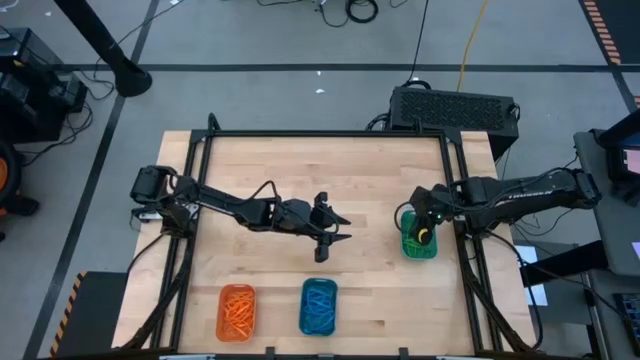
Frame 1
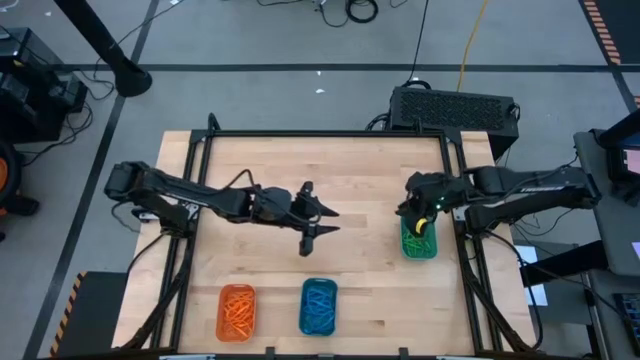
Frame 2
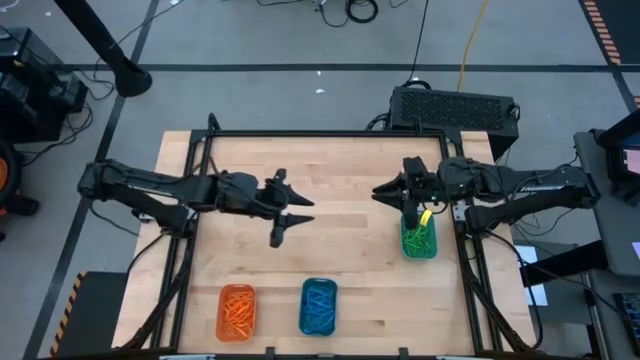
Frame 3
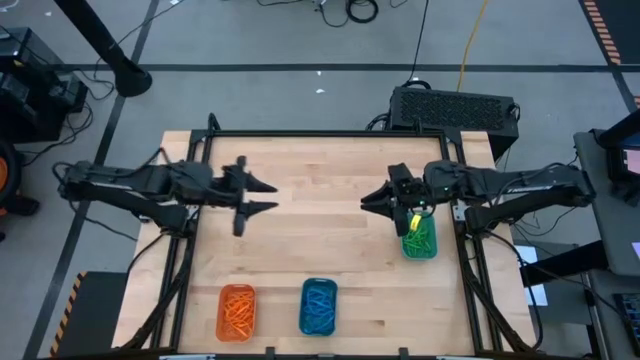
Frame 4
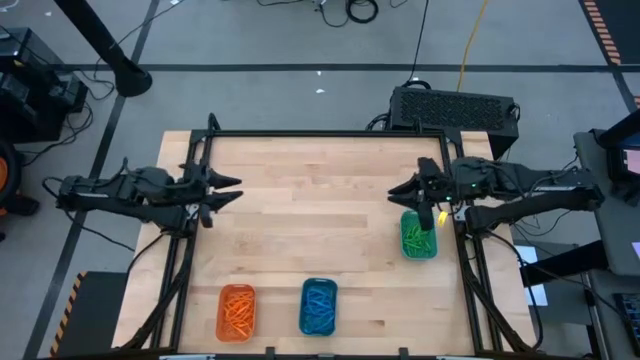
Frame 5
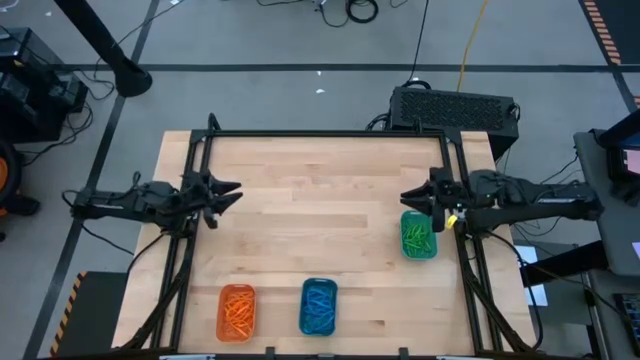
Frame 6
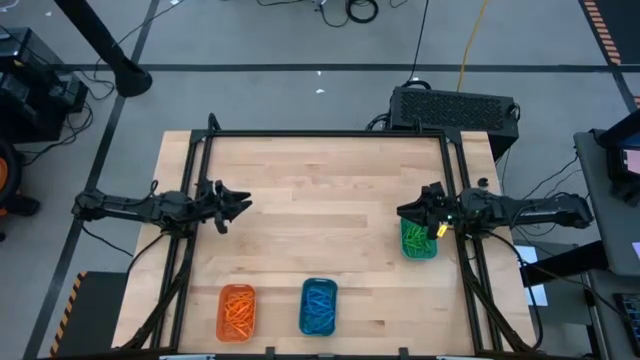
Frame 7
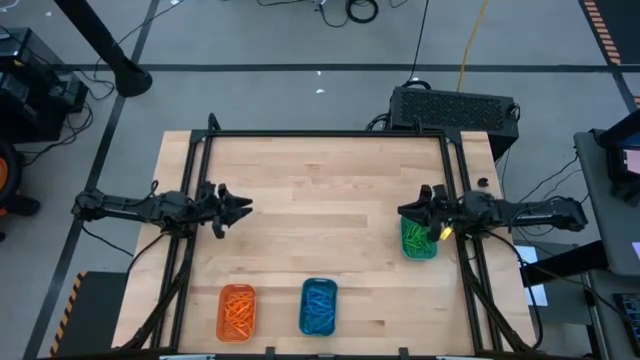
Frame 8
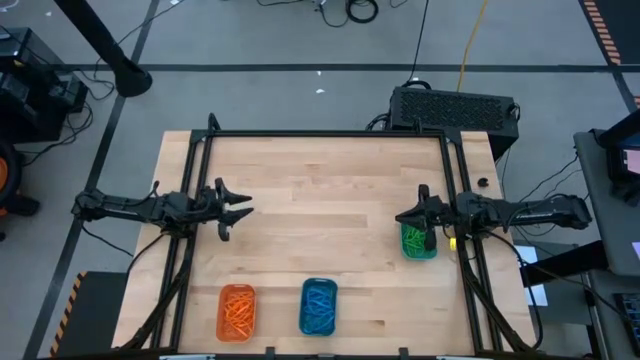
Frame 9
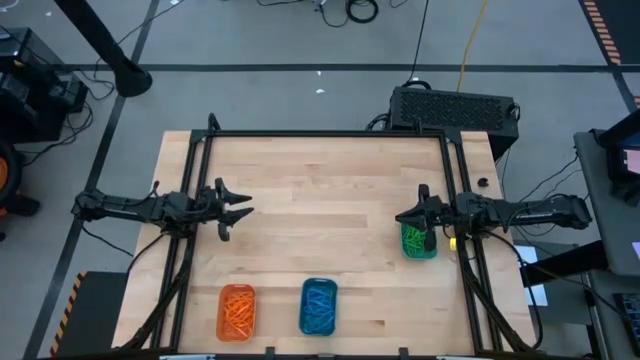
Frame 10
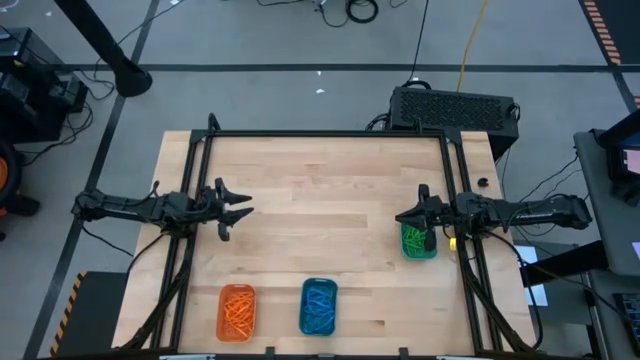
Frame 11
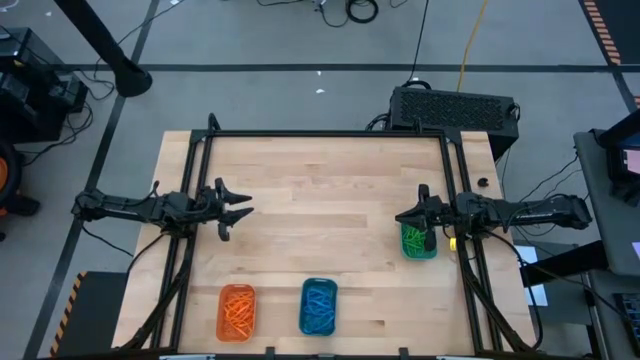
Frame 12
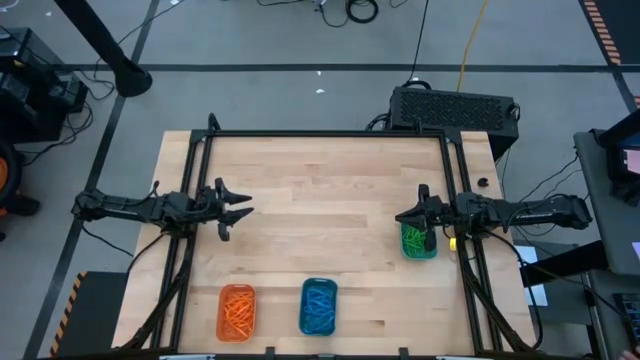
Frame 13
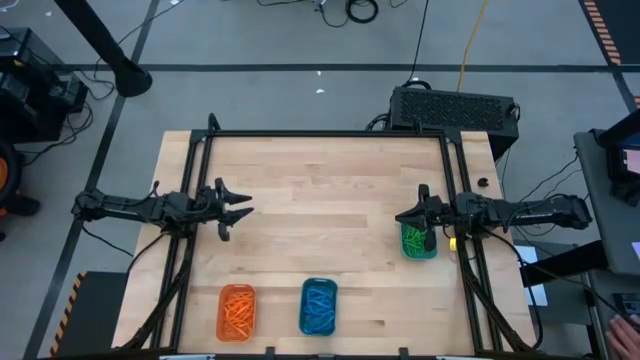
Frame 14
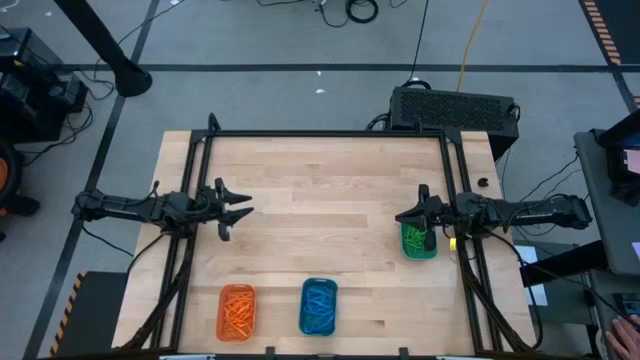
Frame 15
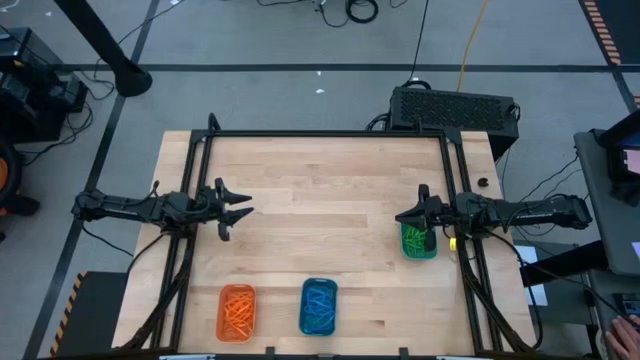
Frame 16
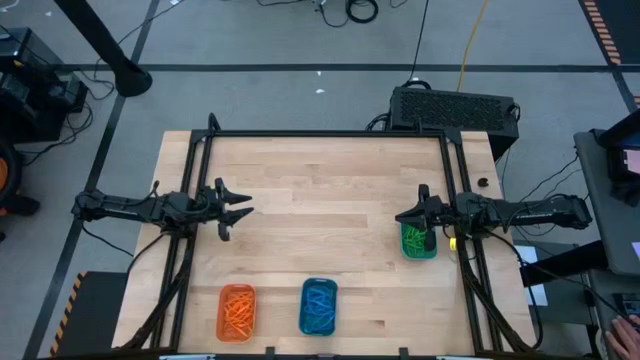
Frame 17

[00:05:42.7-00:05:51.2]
Task: Sort rubber bands into baskets
Return to Home Position

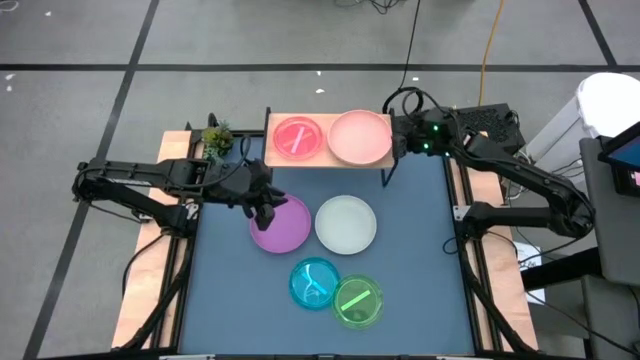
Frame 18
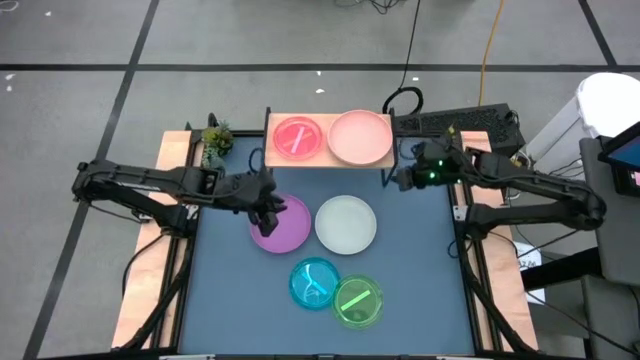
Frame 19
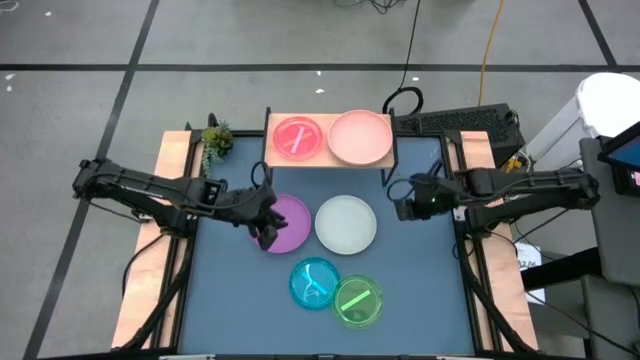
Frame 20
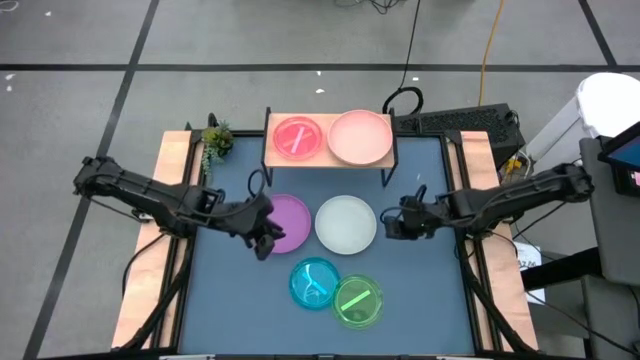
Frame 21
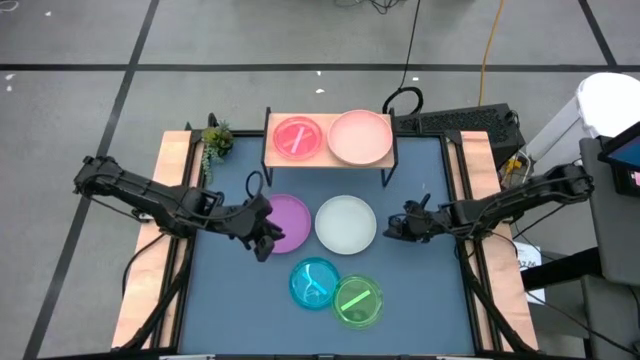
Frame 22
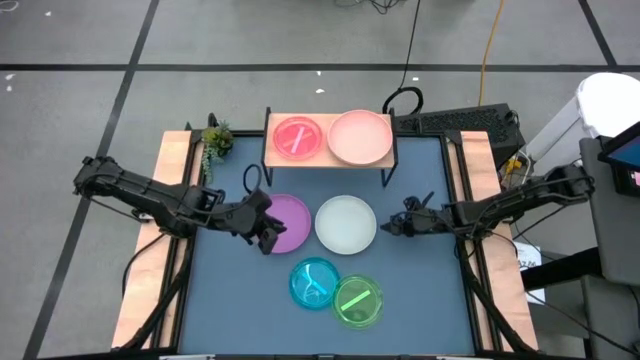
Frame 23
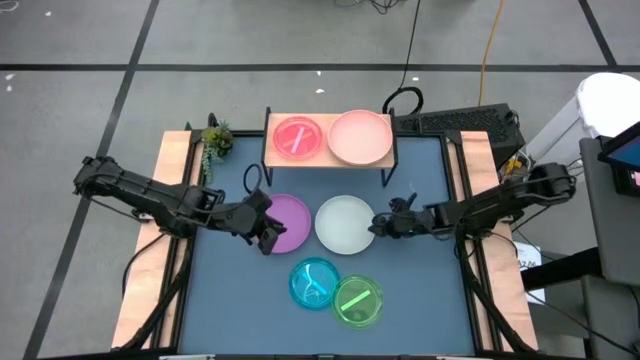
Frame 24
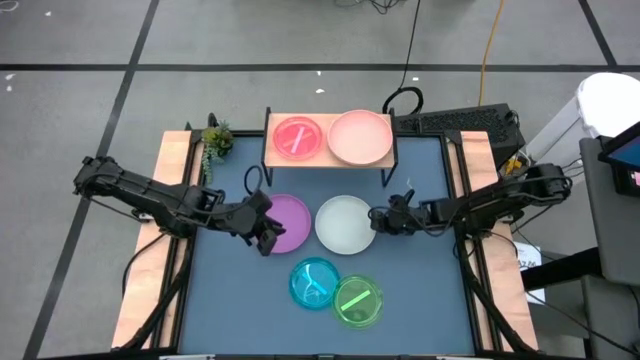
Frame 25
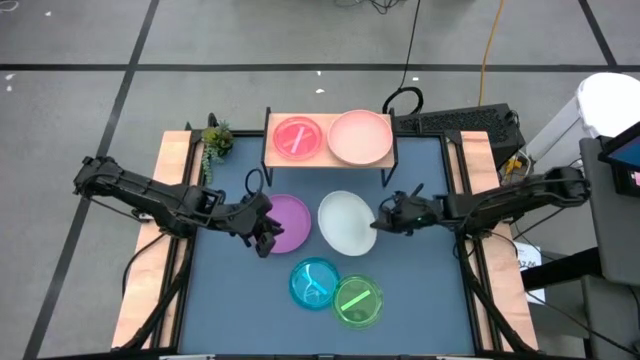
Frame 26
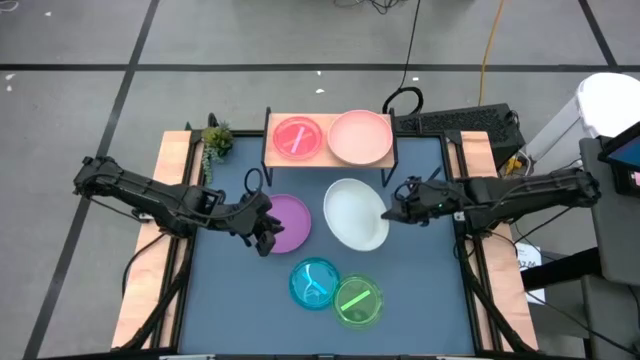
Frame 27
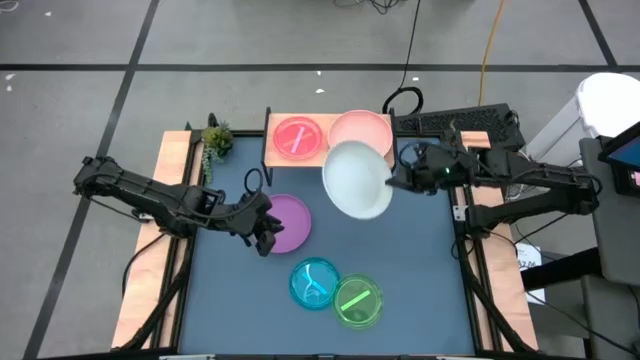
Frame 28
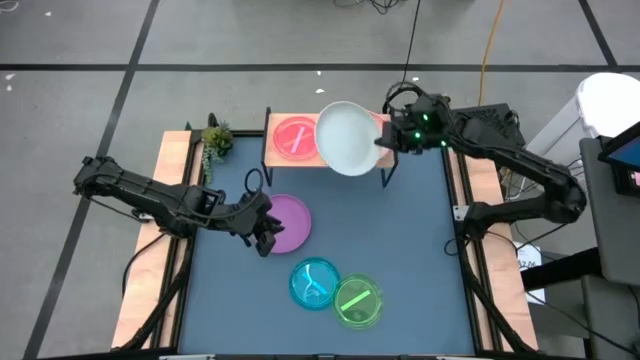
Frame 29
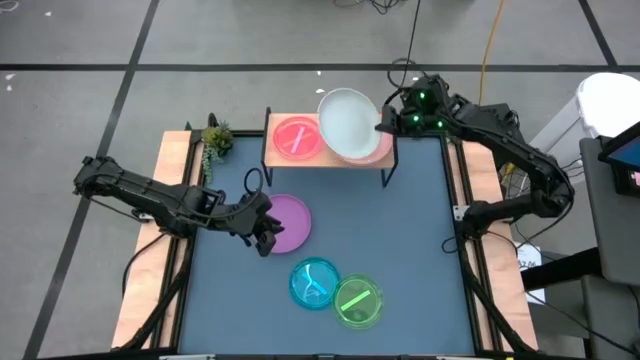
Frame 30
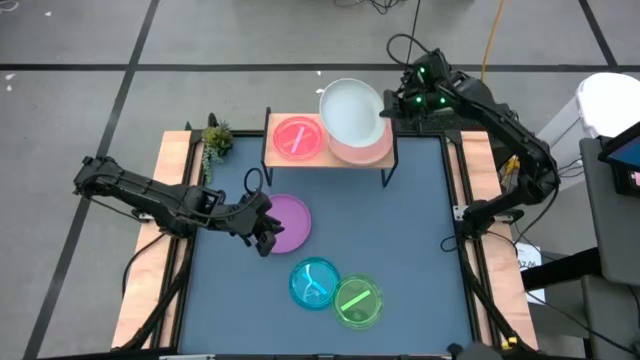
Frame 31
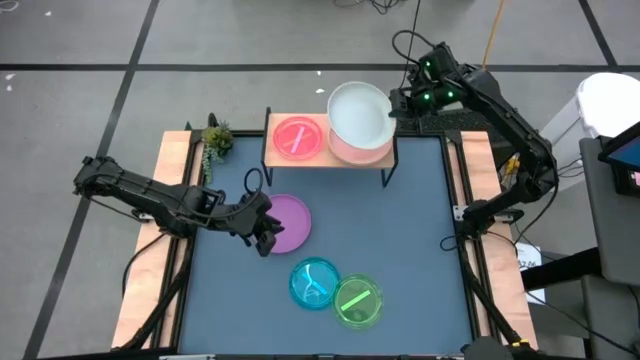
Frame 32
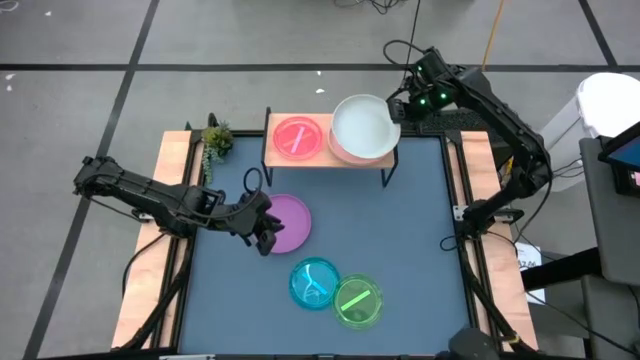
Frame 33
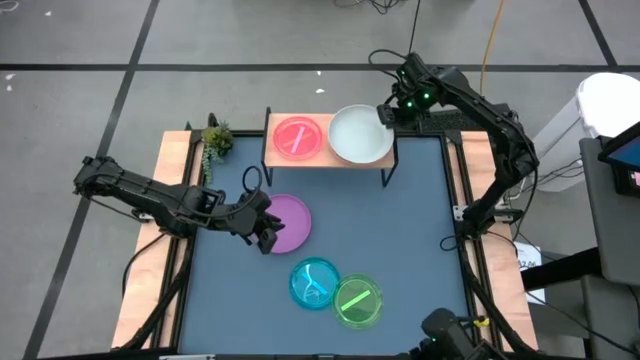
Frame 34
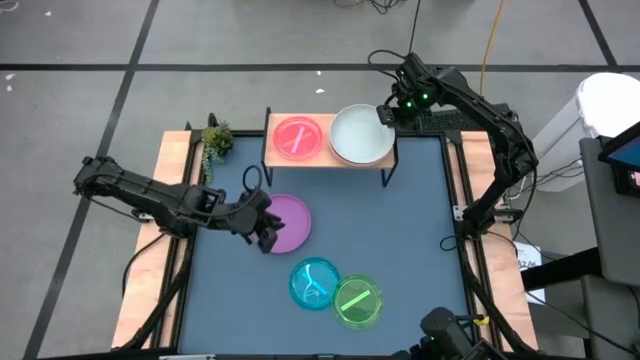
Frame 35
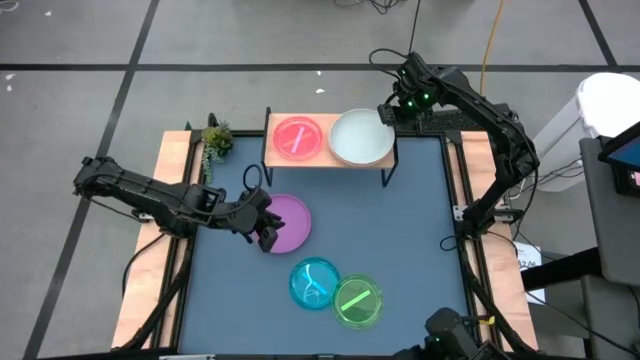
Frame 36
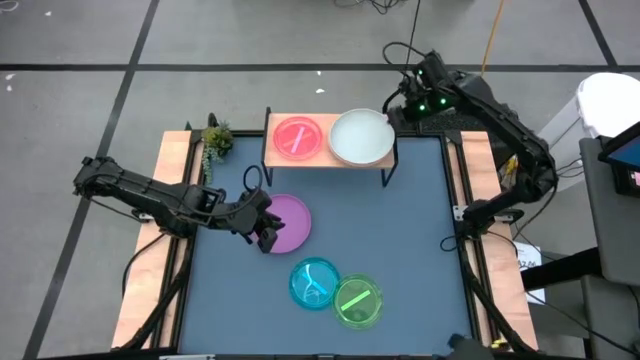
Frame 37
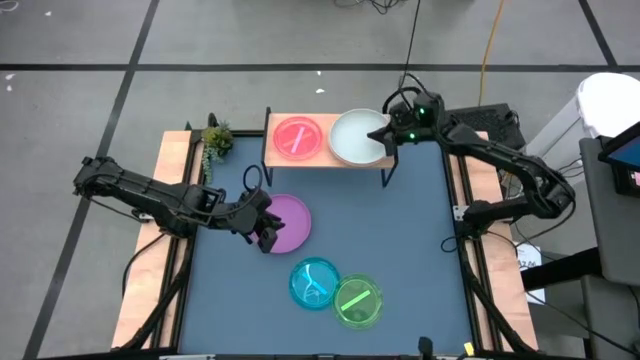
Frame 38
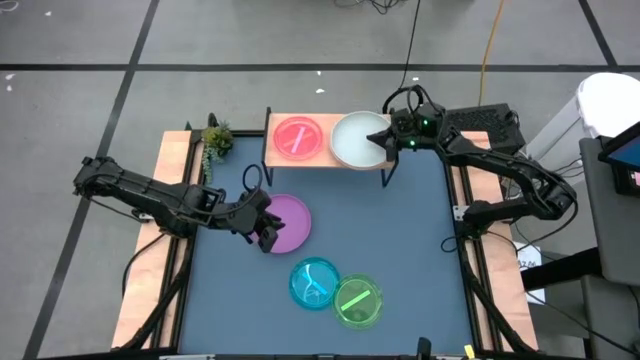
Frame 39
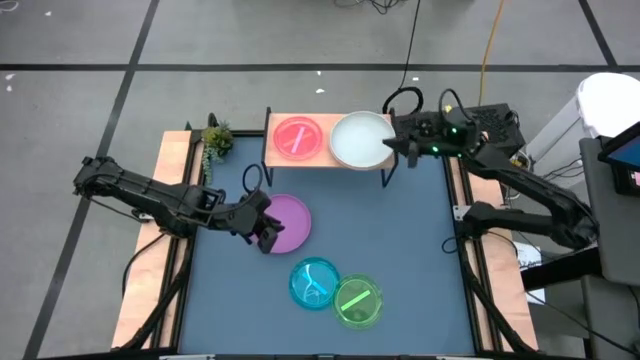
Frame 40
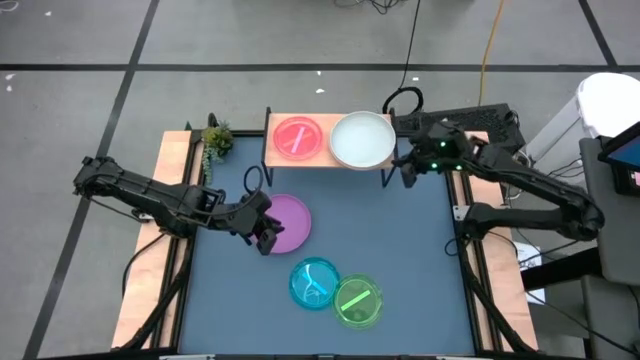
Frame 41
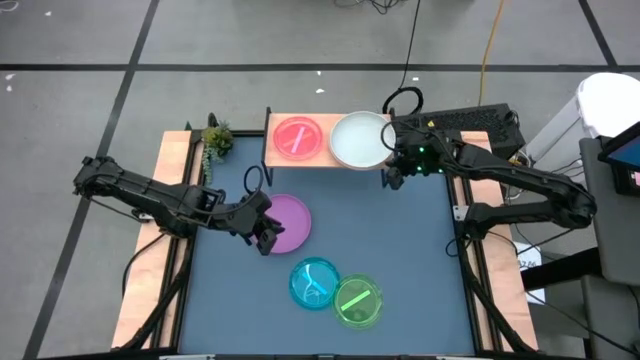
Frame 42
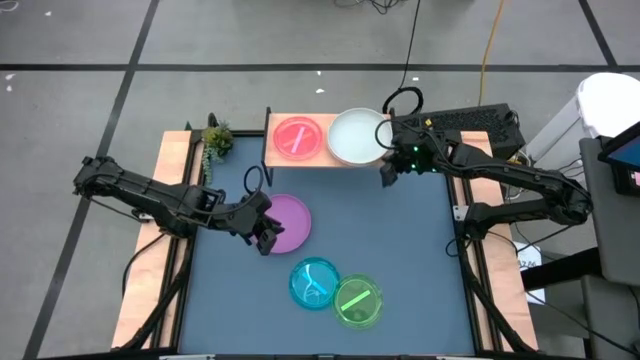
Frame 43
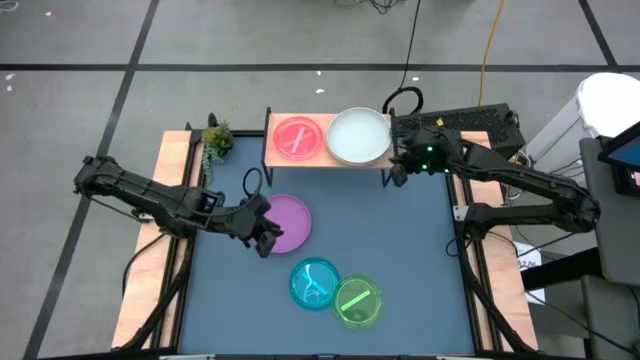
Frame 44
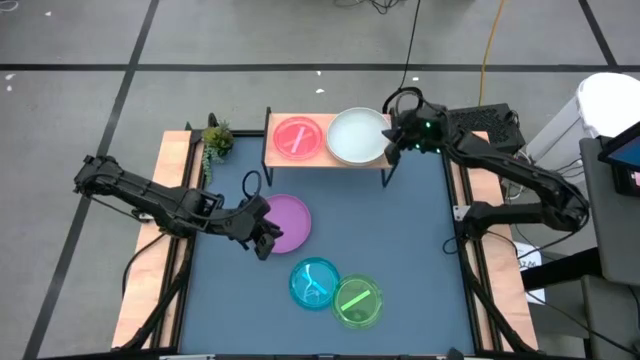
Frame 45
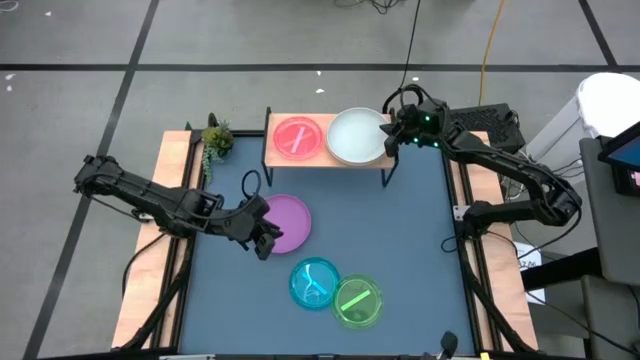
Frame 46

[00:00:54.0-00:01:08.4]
Task: Place and stack plates onto a shelf
Stack the gray plate on top of the light pink plate on the shelf
